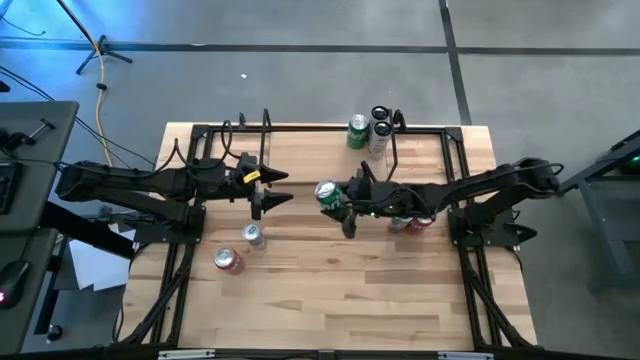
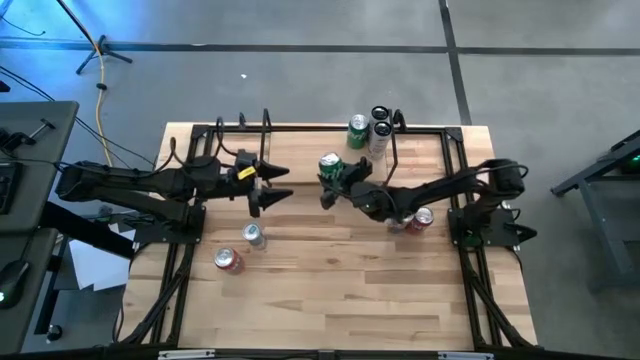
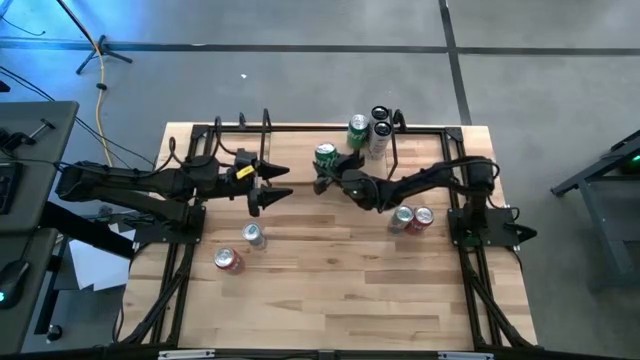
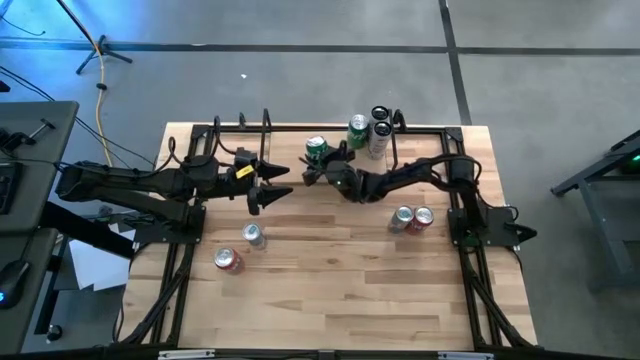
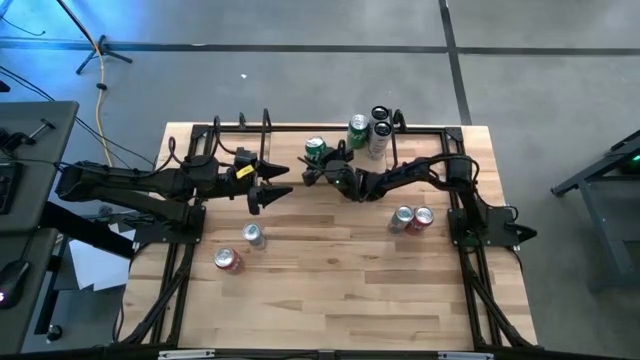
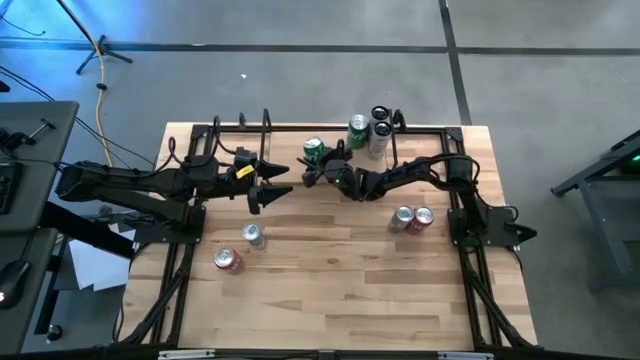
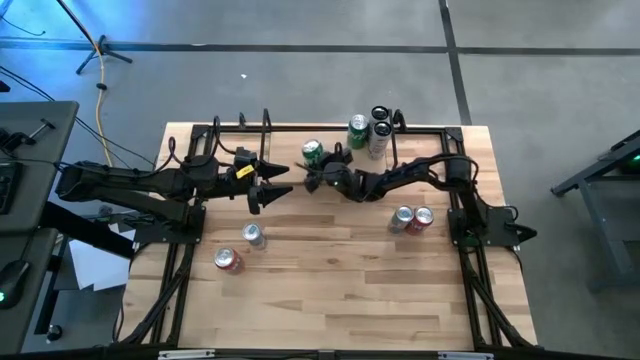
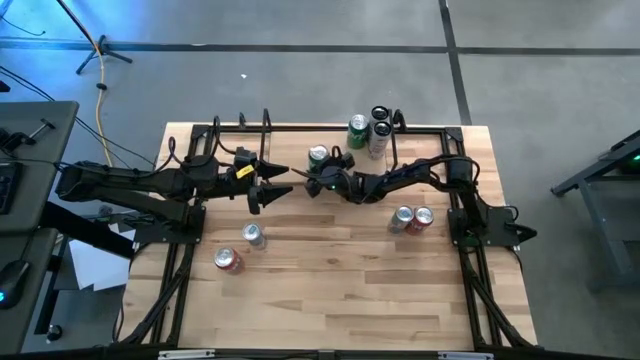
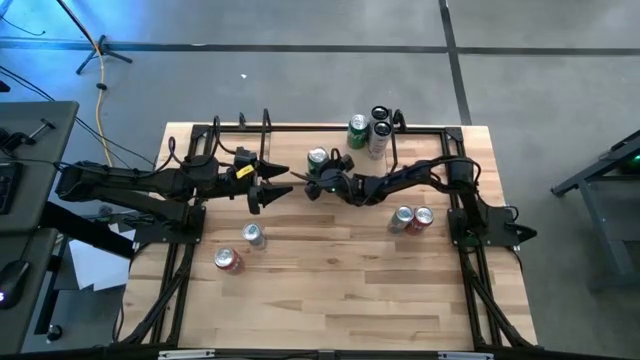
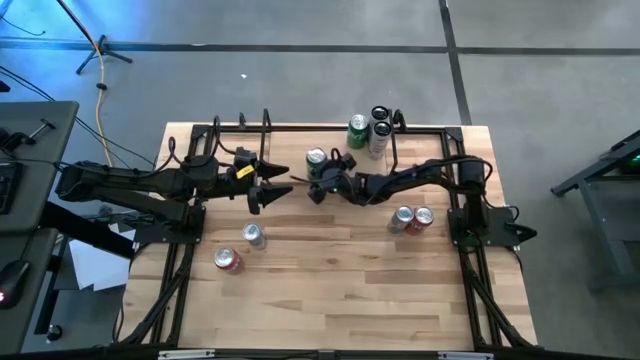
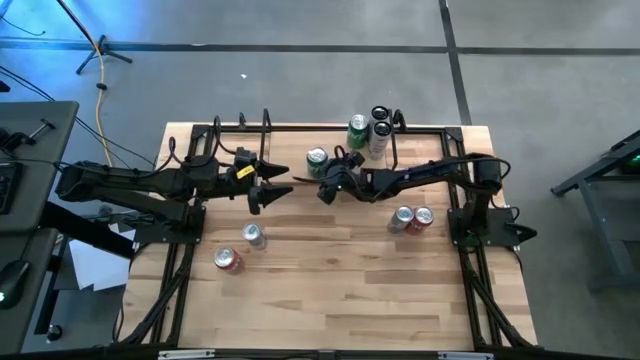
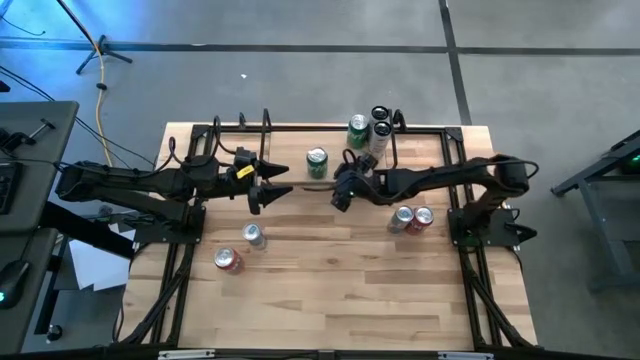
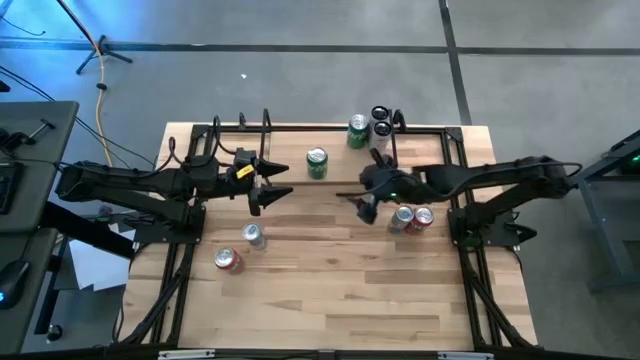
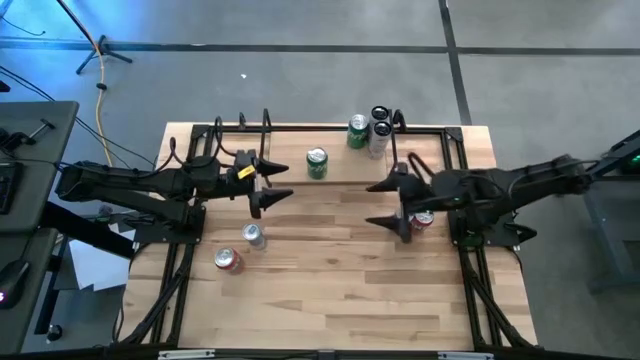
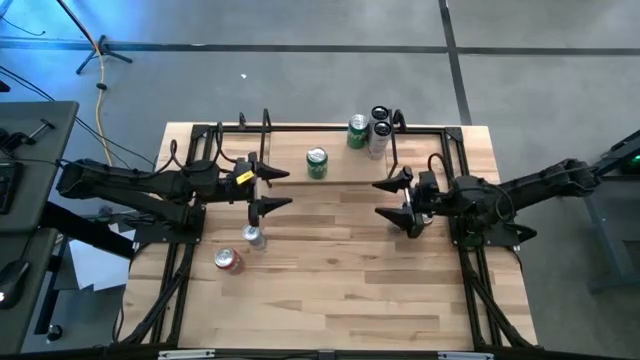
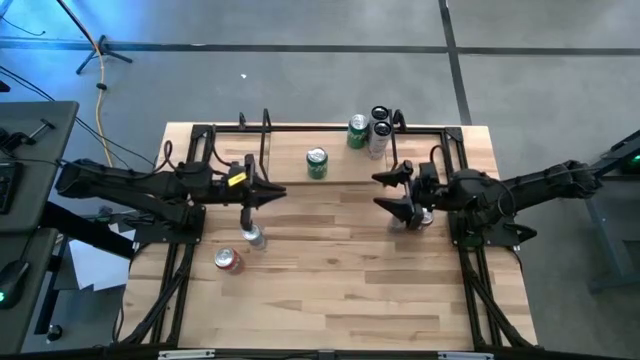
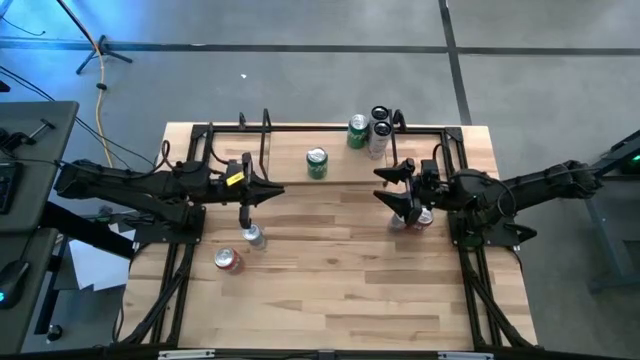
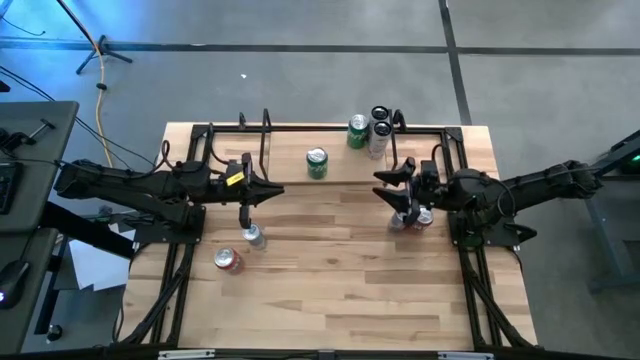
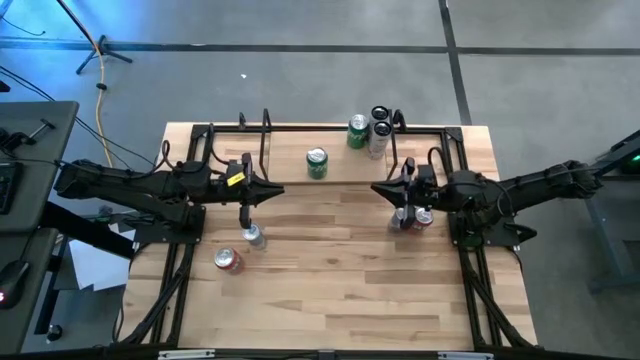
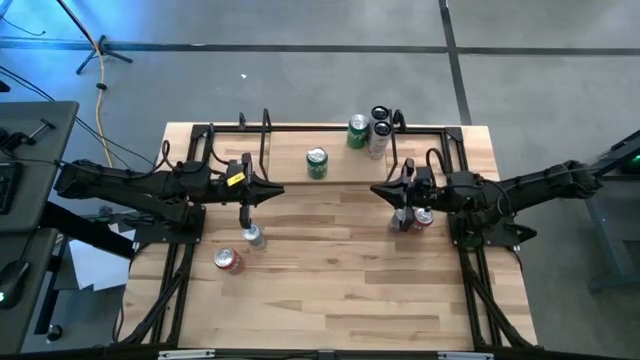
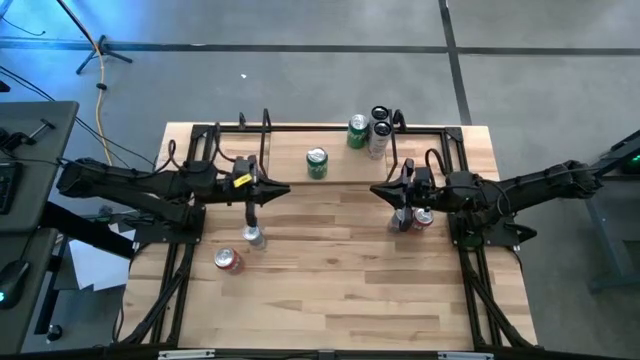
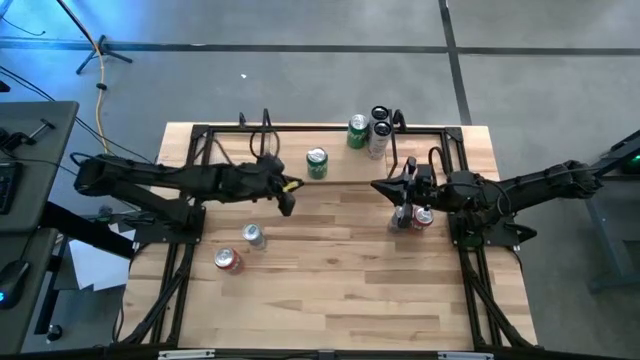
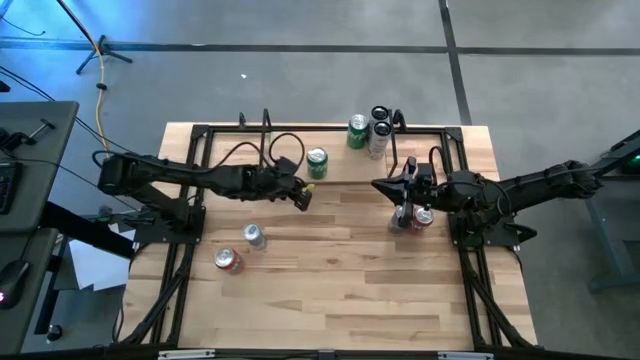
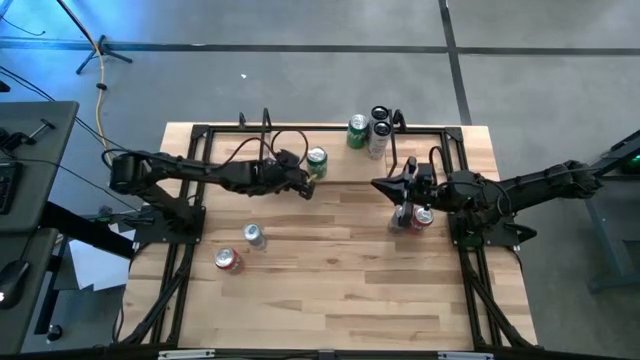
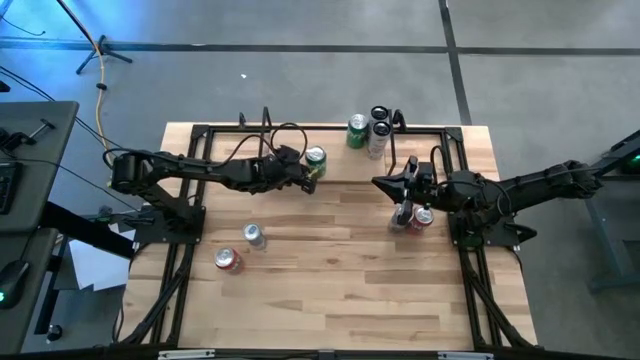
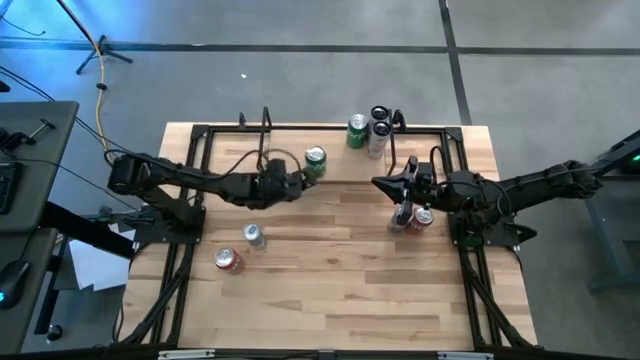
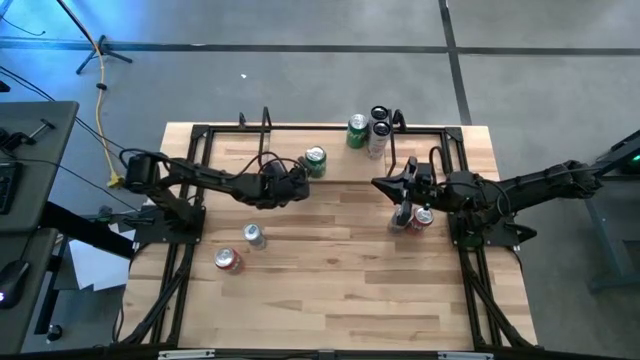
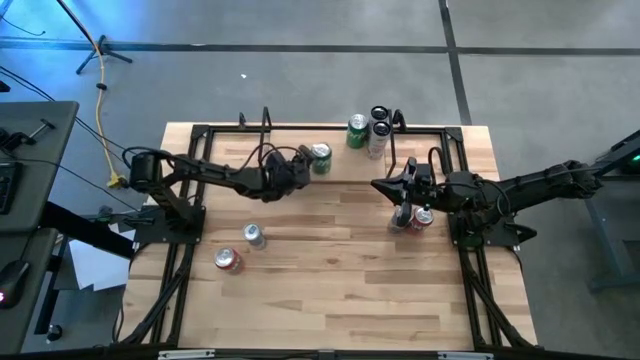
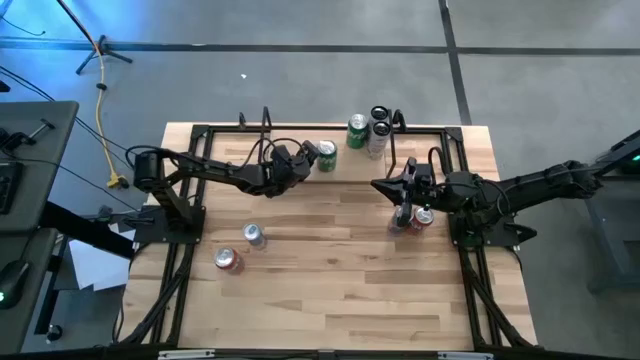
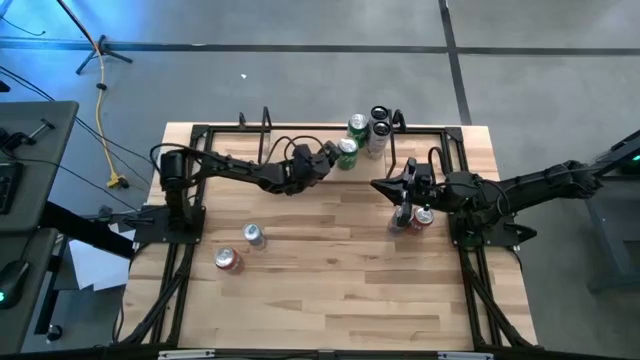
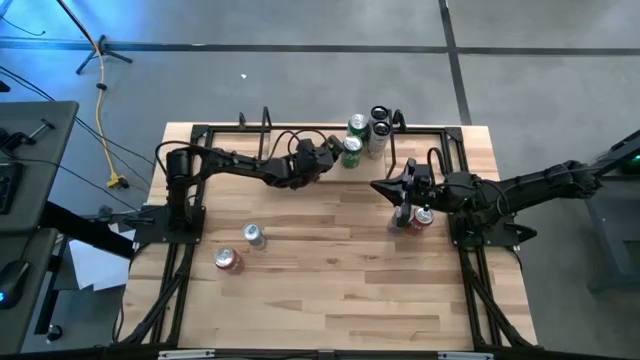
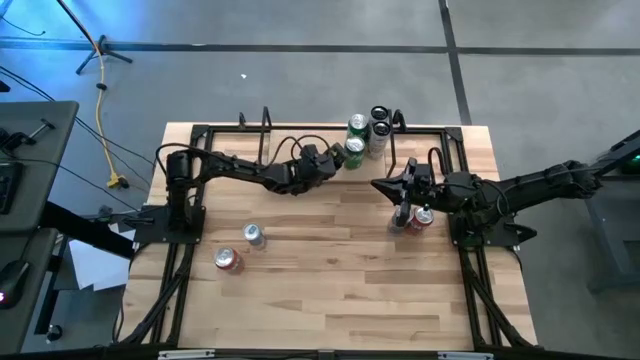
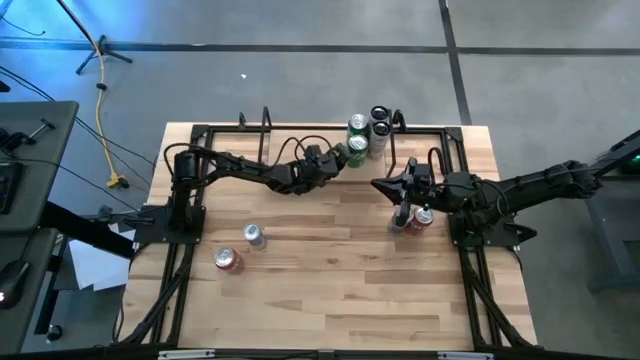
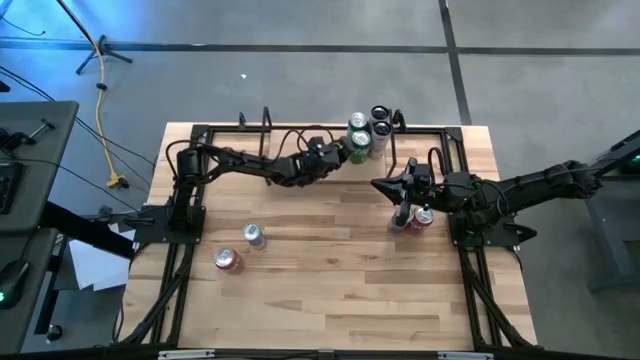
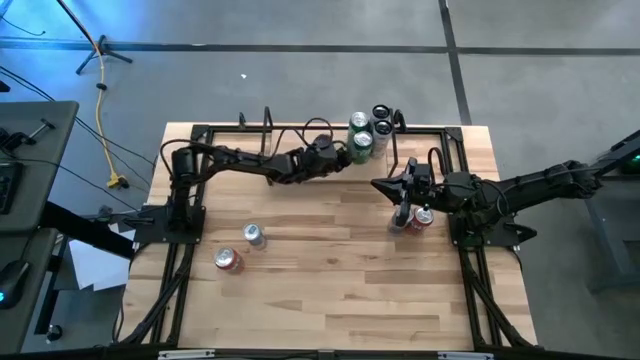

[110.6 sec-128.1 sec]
Task: Place canned beverage on shelf
Put the green soda can on the shelf and align it with the other green soda can

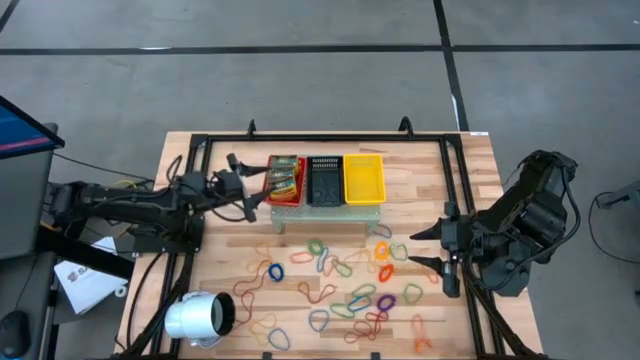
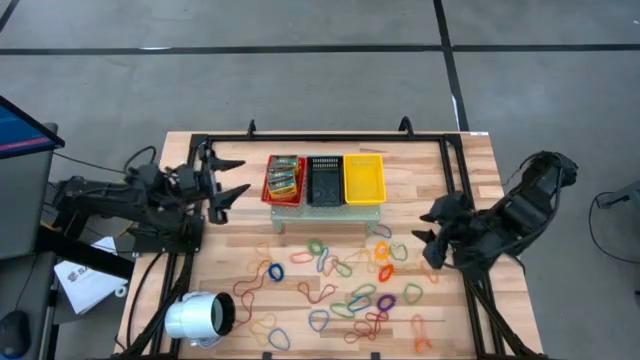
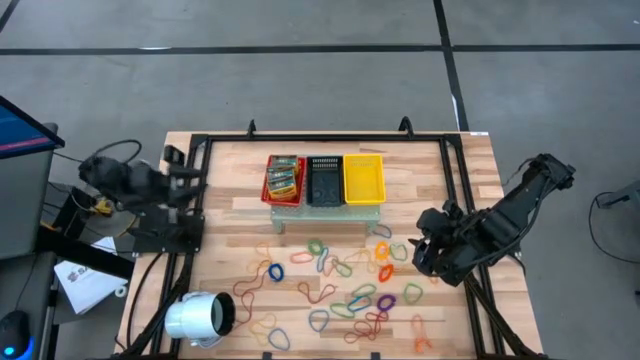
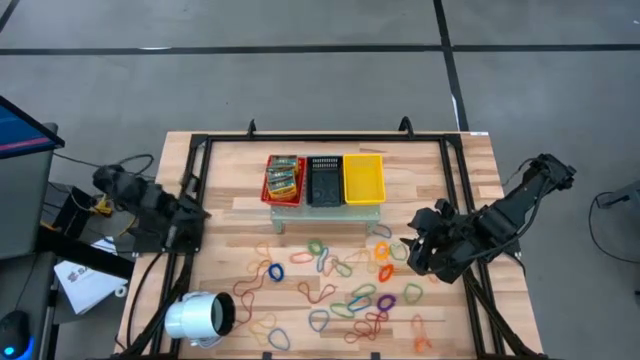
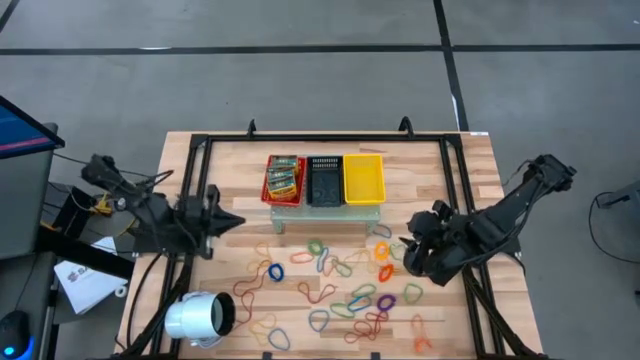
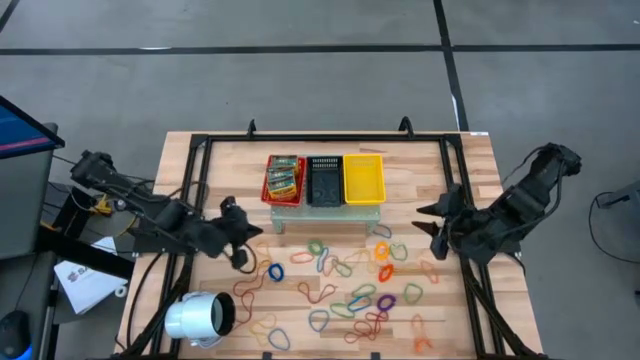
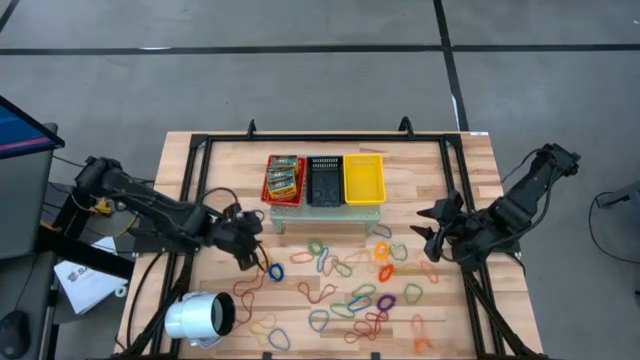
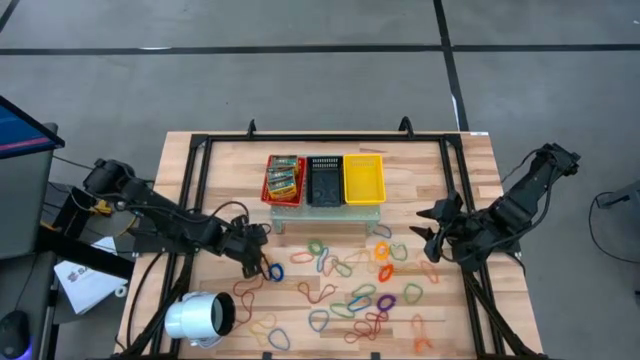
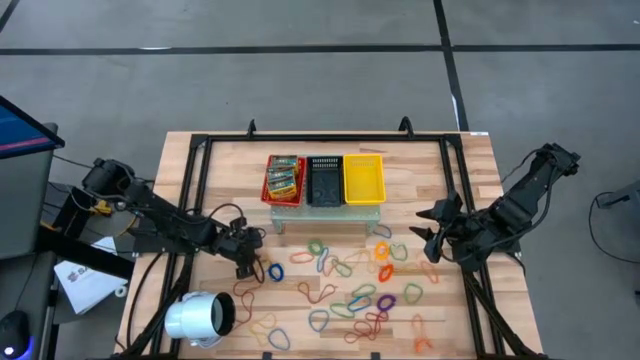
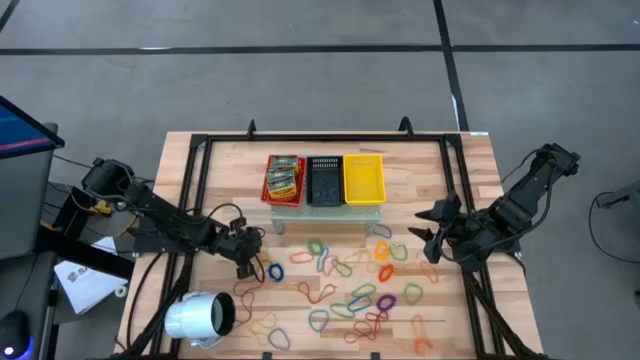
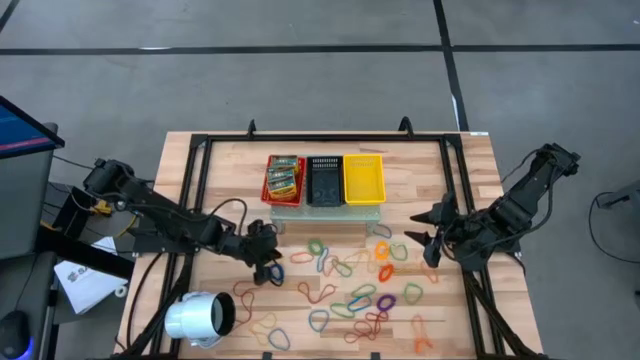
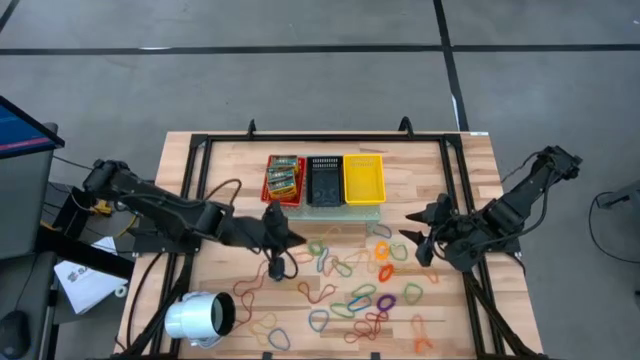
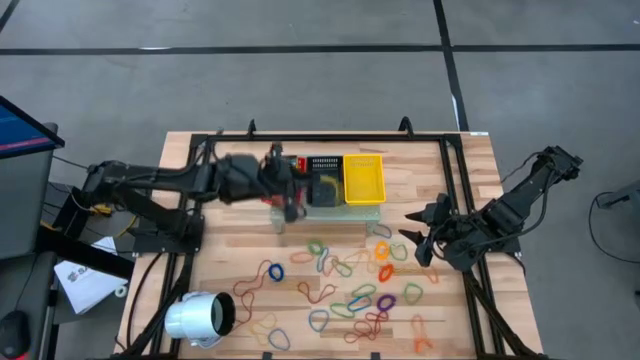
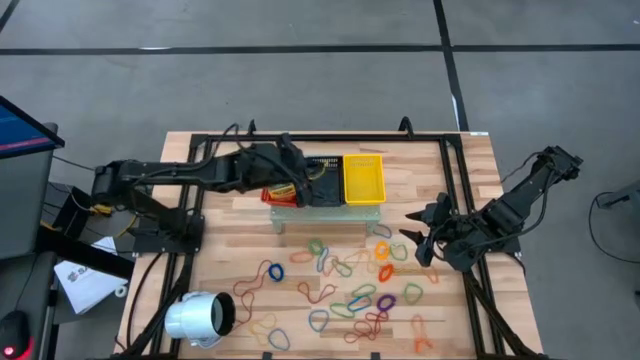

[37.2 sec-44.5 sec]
Task: Pick & Place Office Desk Supplies
Put the yellow rubber band into the black bin on the shelf
